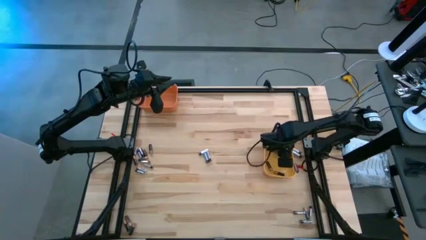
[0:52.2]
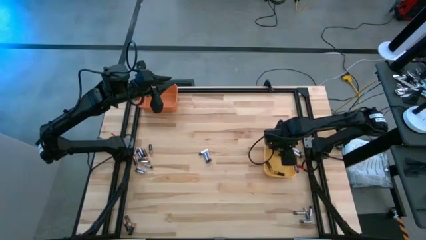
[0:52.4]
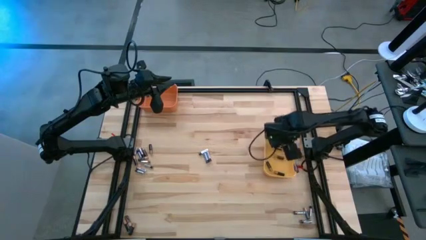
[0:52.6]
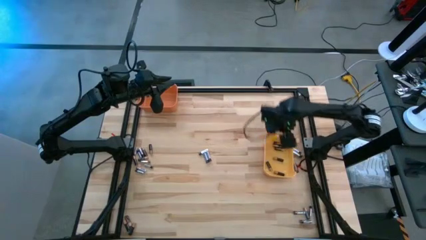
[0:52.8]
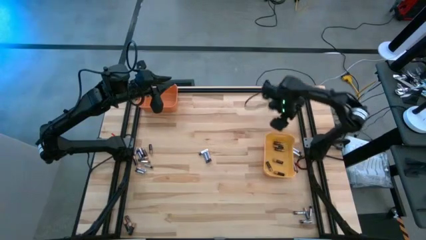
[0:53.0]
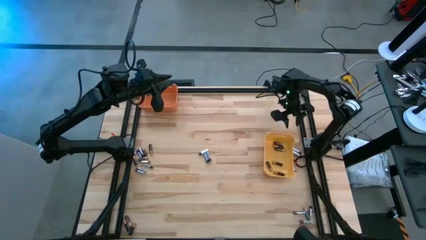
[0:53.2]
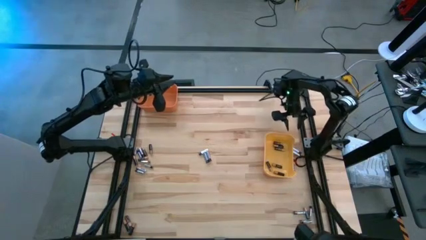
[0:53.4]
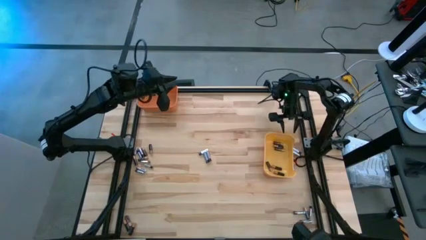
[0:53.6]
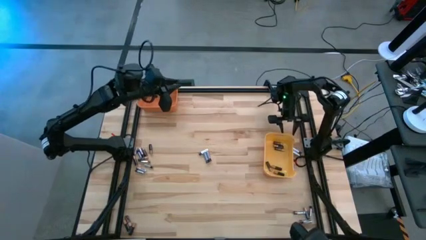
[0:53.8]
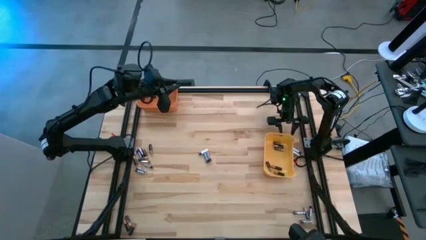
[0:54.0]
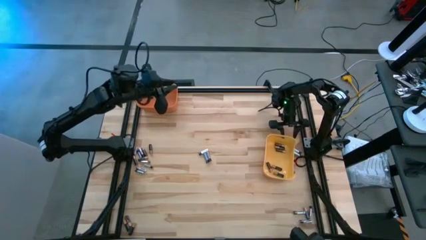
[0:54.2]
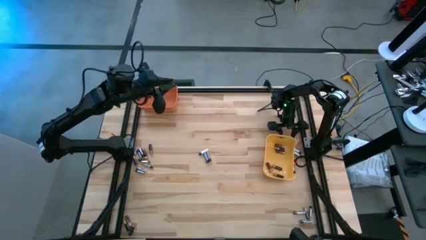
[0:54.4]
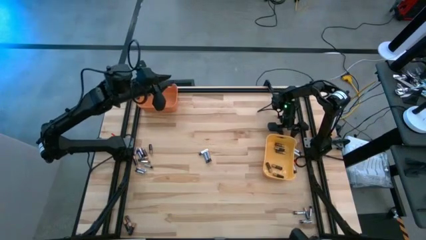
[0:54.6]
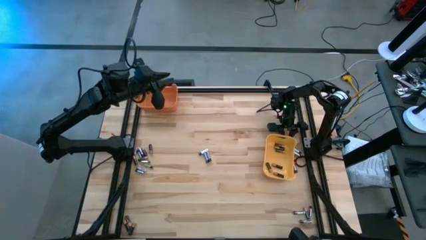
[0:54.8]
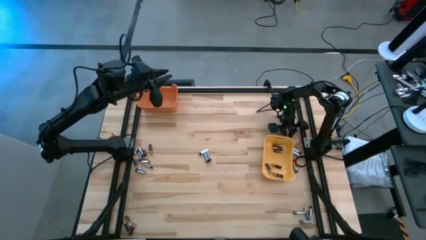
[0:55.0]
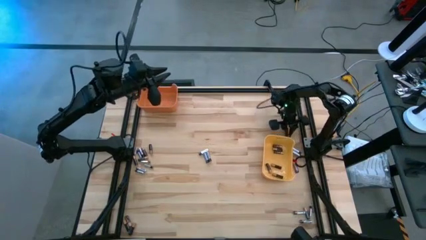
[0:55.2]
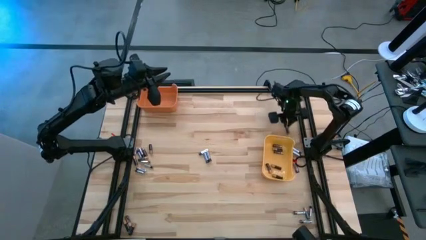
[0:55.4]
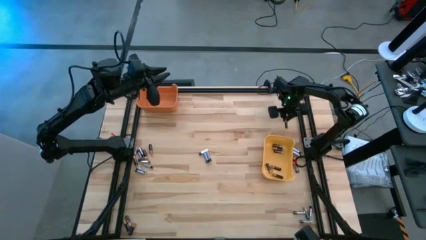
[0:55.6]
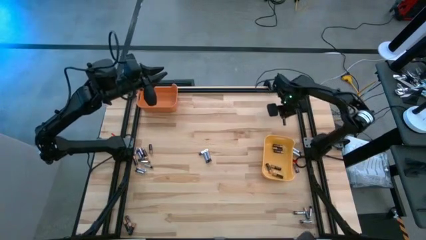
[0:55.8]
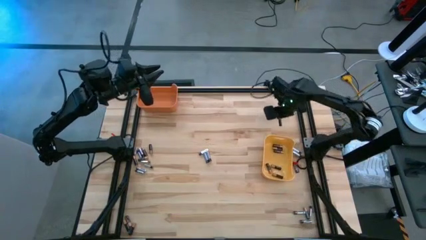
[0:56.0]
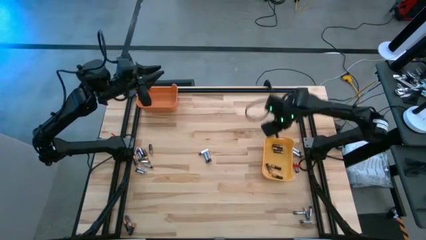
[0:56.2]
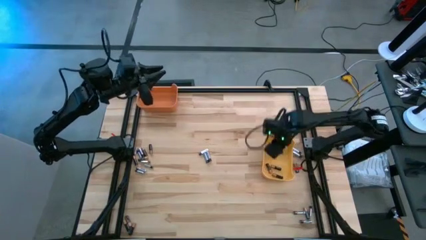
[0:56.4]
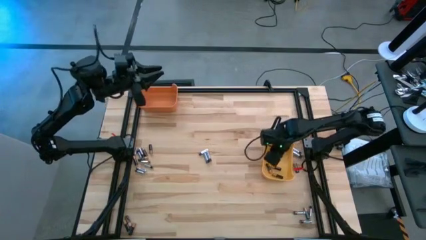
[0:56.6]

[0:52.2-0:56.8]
Task: Sort batteries
Put the black battery into the yellow bin

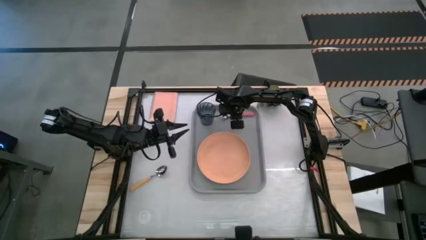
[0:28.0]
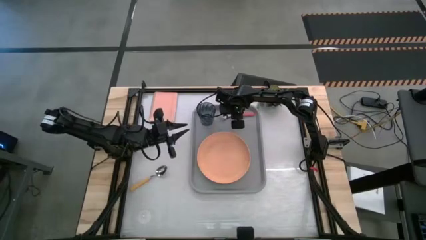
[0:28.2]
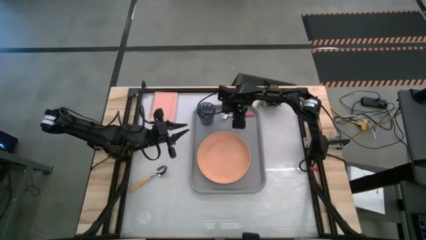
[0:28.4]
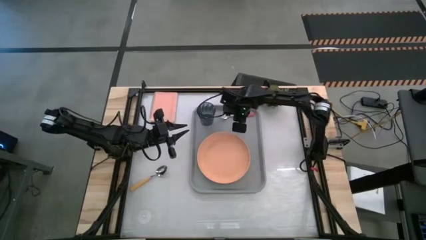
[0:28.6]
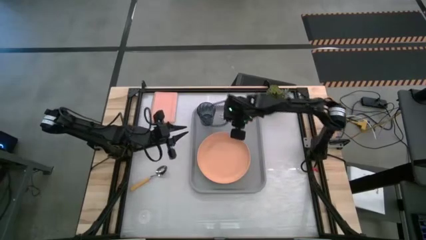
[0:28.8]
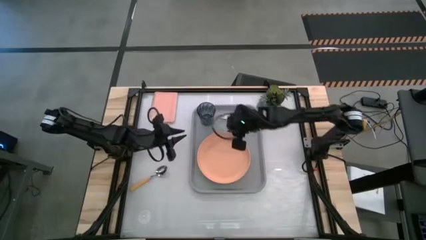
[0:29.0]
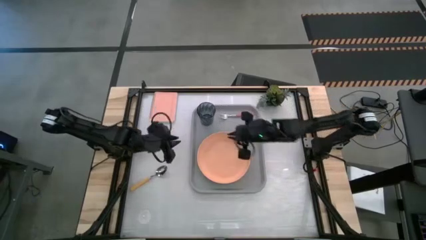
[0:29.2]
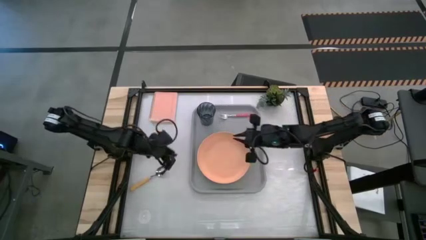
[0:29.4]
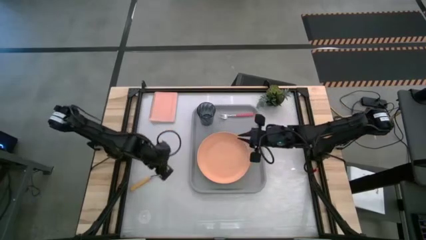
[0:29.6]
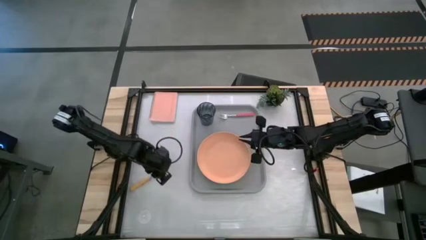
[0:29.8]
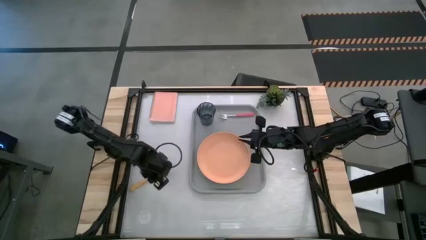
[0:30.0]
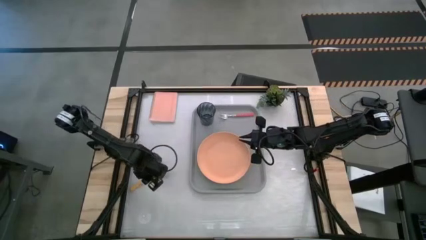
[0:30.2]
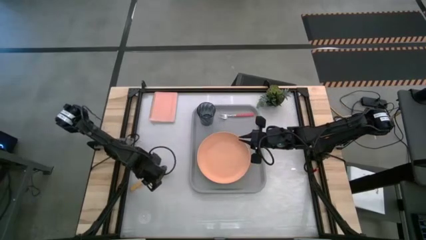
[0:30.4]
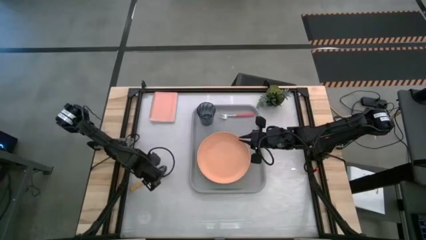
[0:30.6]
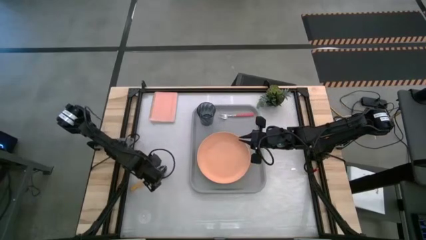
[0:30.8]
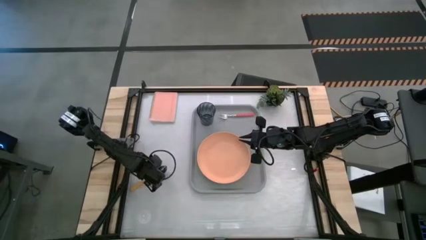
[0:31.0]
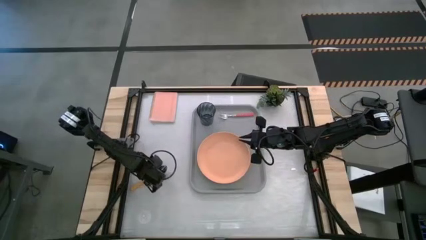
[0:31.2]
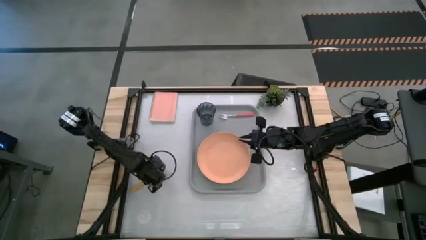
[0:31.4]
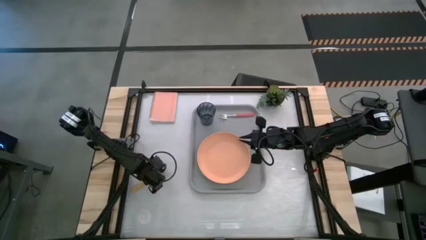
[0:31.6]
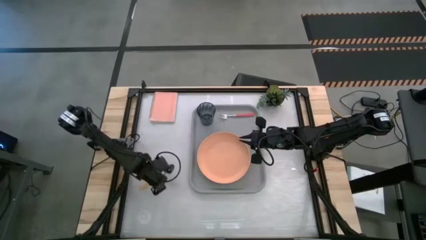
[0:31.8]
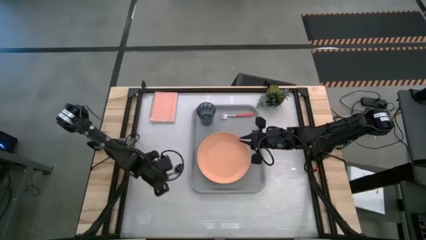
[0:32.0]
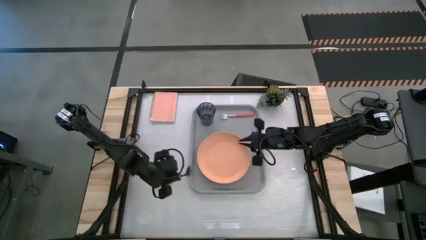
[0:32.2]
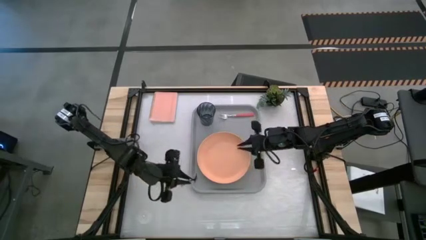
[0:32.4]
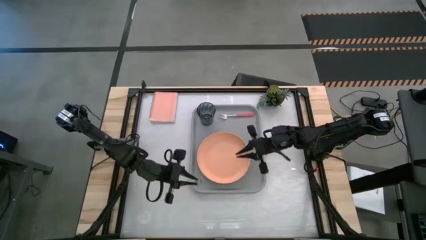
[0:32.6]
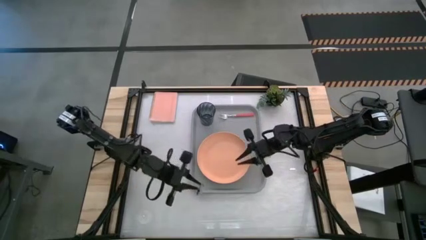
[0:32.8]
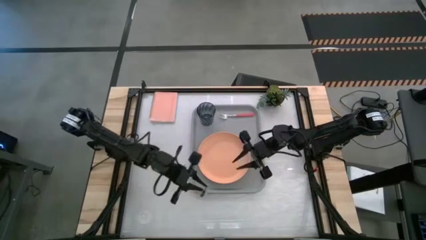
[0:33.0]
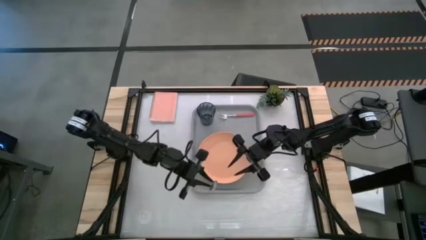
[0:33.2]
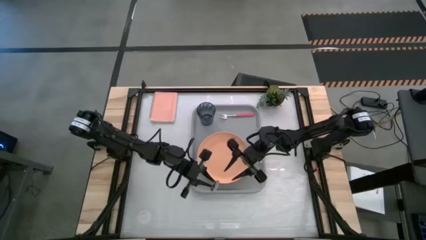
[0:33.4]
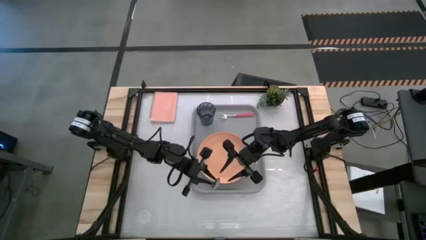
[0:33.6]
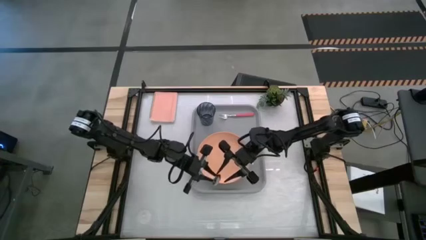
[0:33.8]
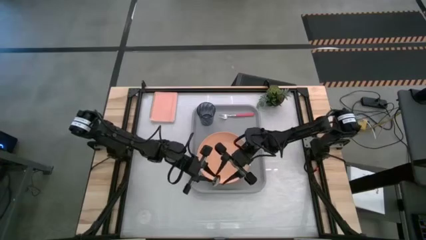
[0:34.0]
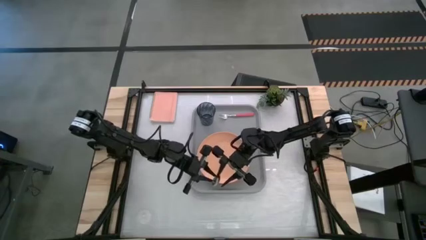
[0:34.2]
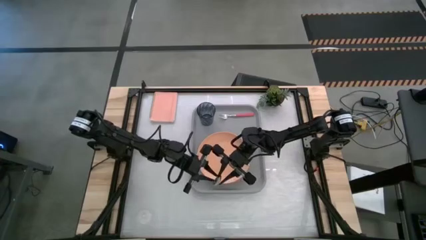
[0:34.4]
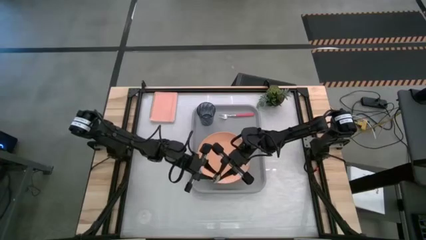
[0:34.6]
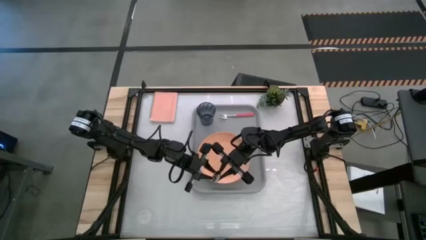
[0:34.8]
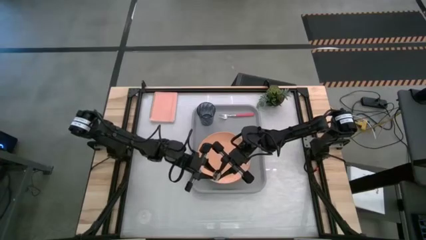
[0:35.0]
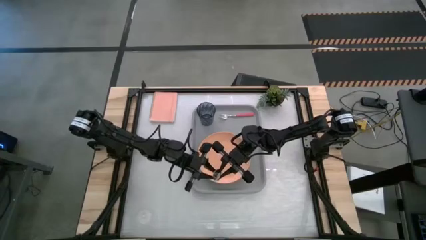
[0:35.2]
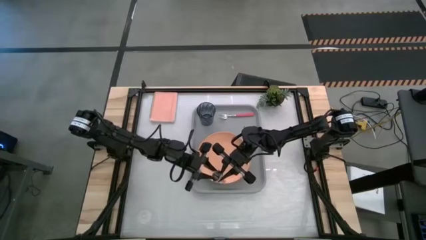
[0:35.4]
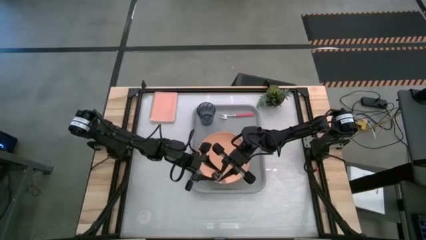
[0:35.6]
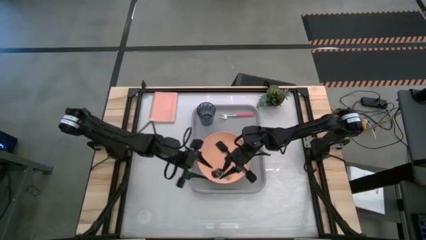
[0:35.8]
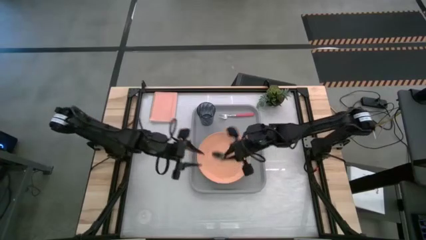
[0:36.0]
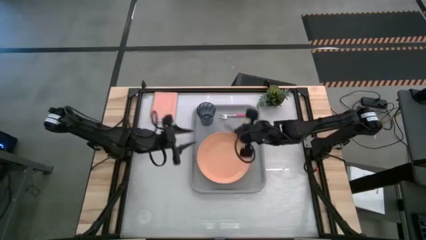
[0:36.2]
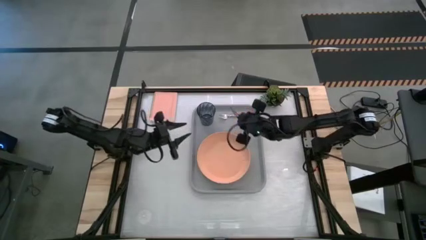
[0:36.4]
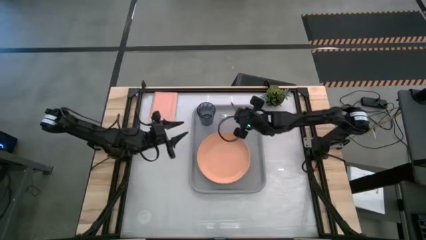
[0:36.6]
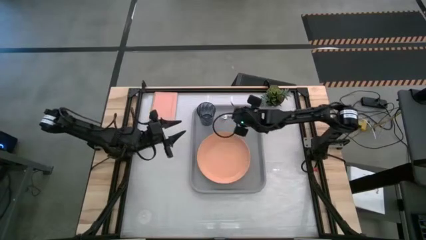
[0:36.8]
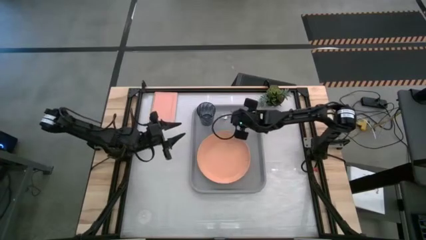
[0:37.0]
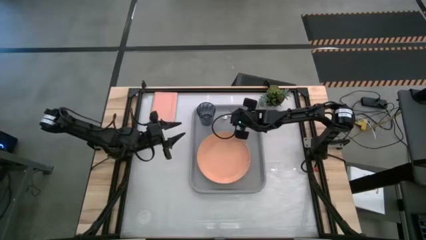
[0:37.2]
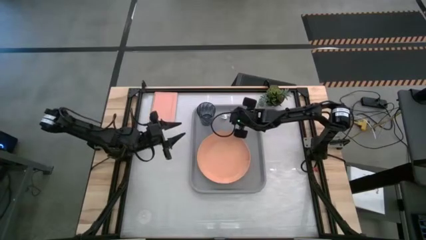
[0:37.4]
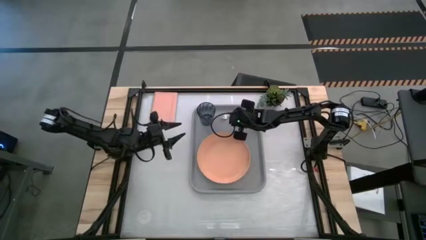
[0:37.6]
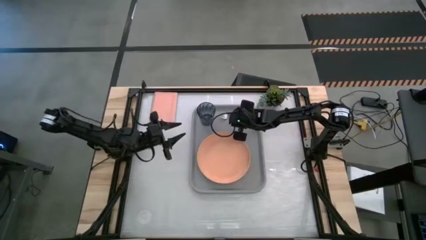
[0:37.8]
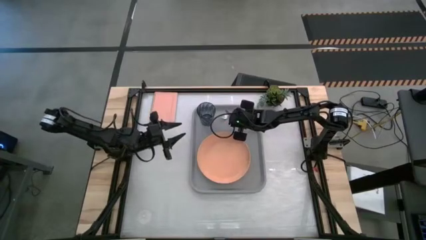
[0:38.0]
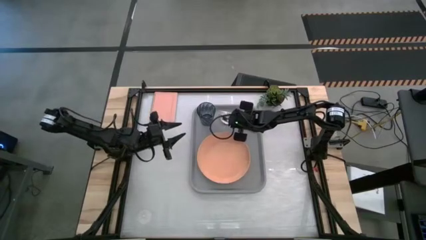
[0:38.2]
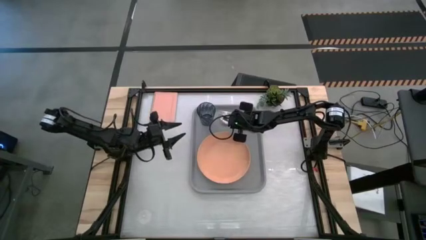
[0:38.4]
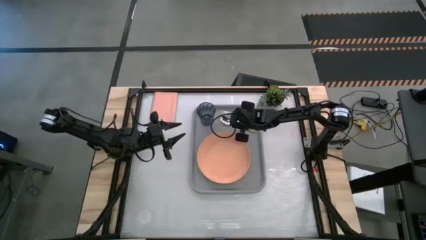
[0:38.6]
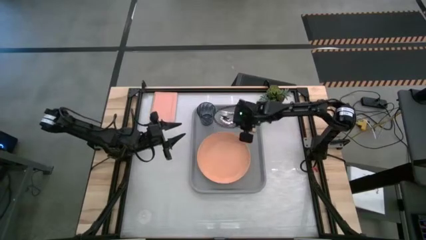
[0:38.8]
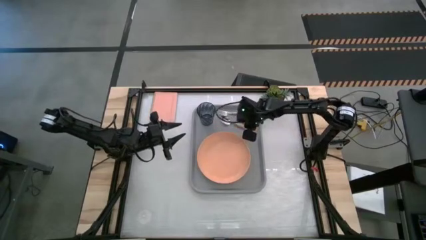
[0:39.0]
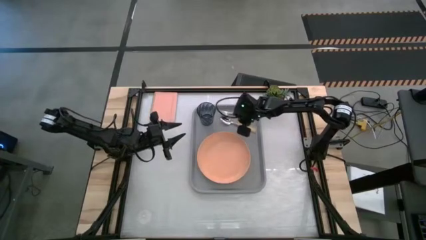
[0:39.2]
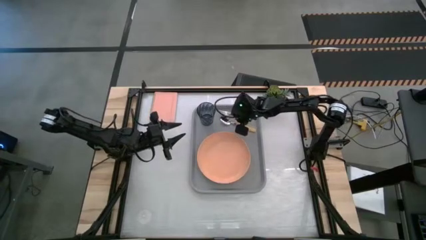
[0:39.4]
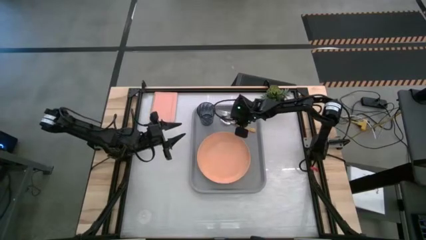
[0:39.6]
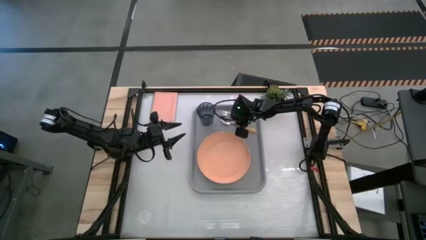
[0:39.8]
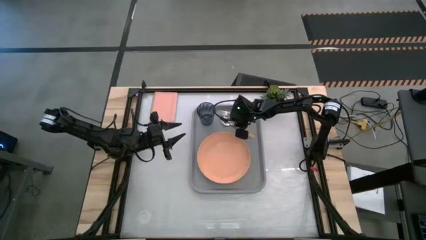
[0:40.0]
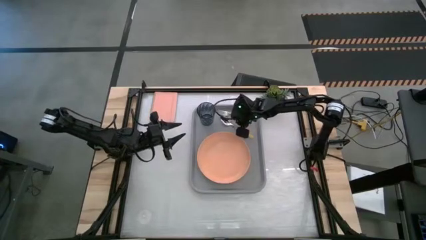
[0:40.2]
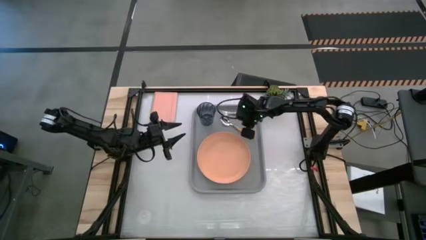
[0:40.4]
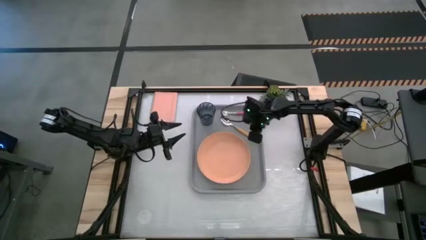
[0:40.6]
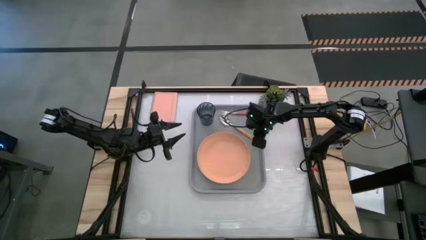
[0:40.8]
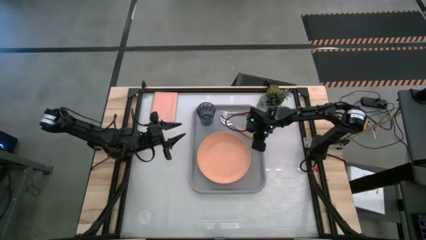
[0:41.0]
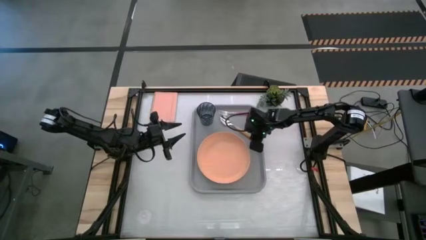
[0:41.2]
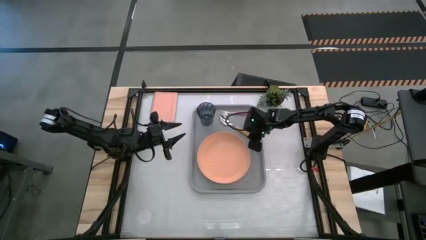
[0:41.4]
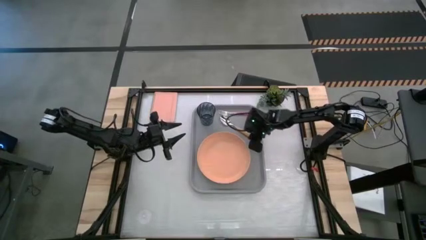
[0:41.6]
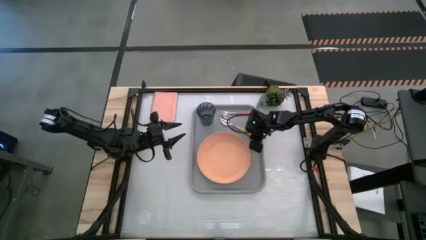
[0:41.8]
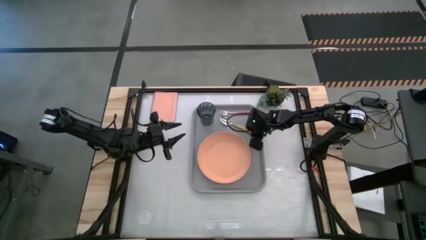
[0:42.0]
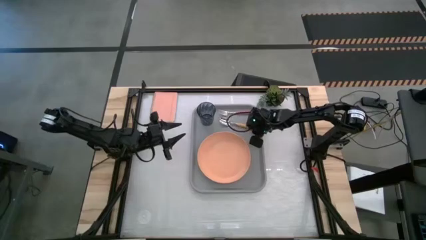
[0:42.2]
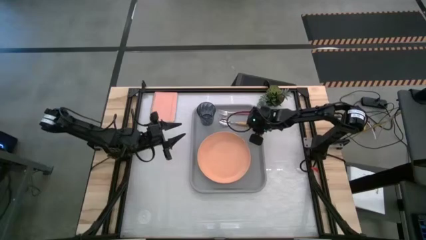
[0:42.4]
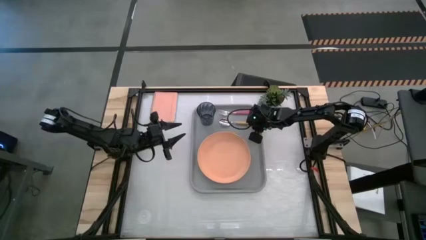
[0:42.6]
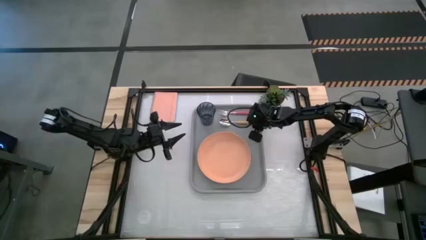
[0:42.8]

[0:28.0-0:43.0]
Task: Pick and place plate/cup/fork/spoon on tray
Put the orange spoon on the gray tray to the bottom of the pink fork
